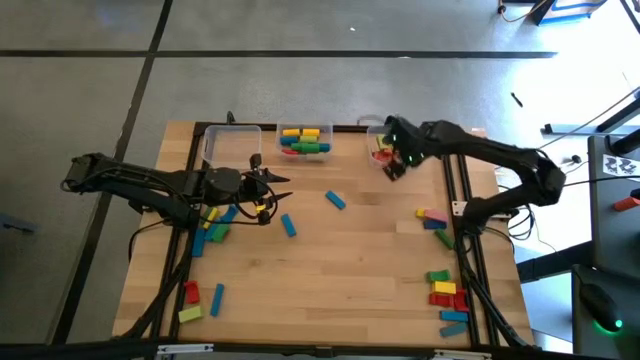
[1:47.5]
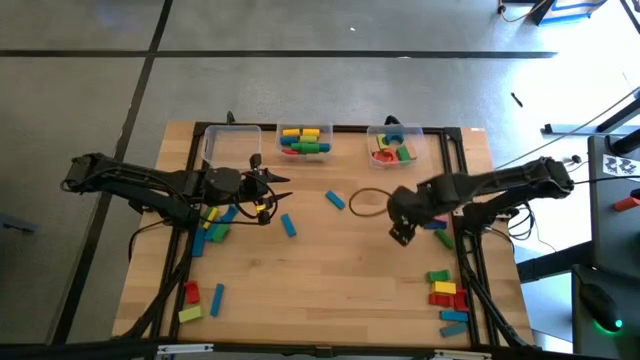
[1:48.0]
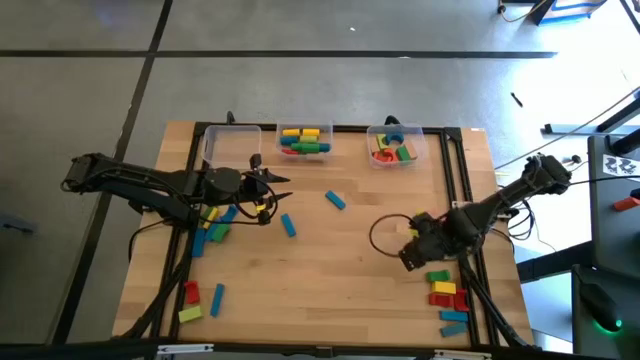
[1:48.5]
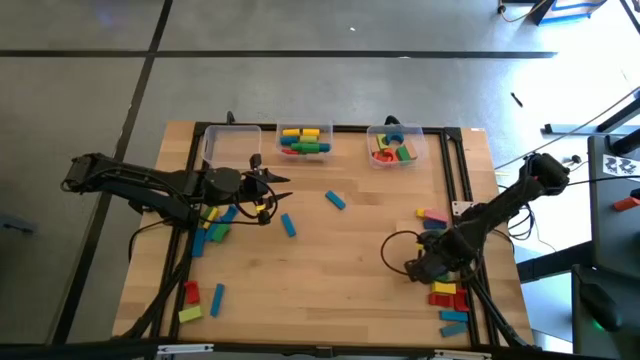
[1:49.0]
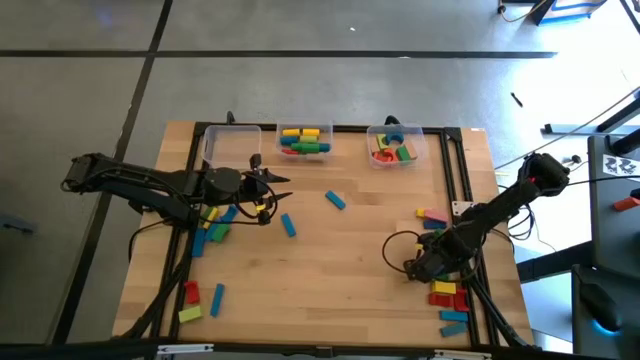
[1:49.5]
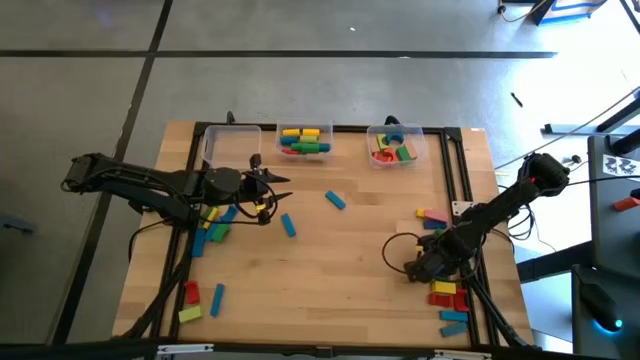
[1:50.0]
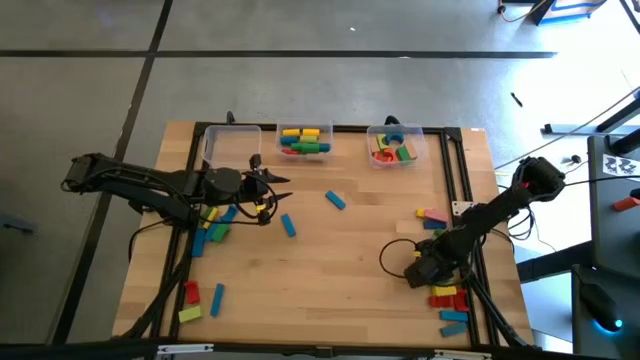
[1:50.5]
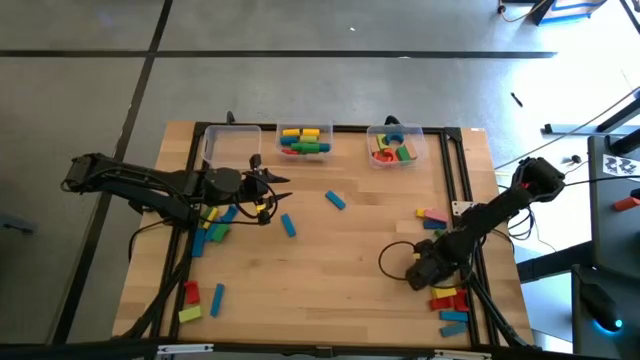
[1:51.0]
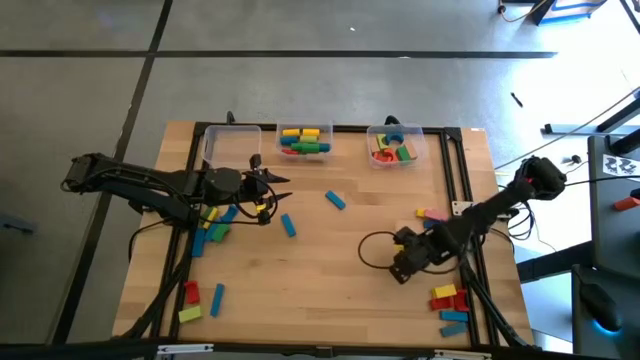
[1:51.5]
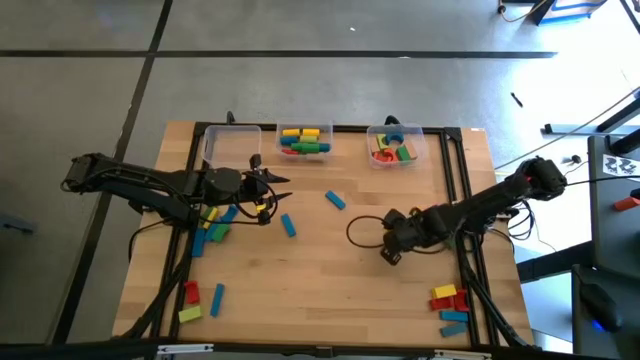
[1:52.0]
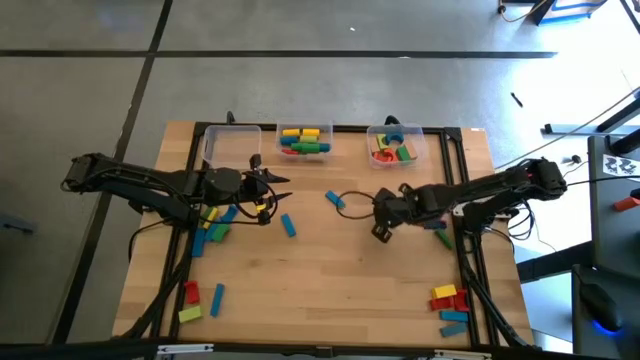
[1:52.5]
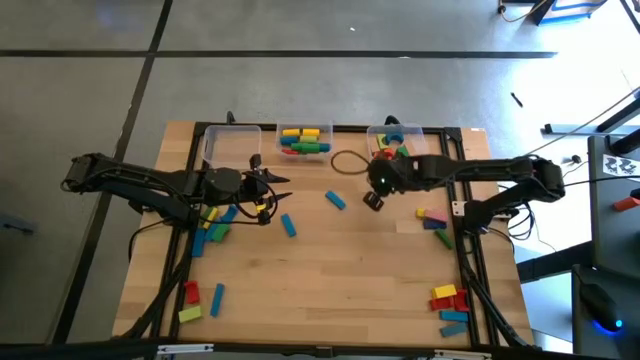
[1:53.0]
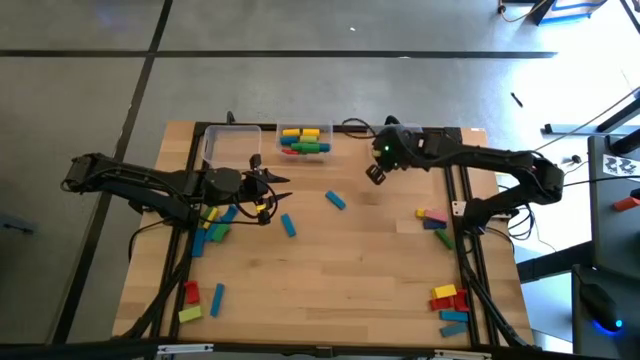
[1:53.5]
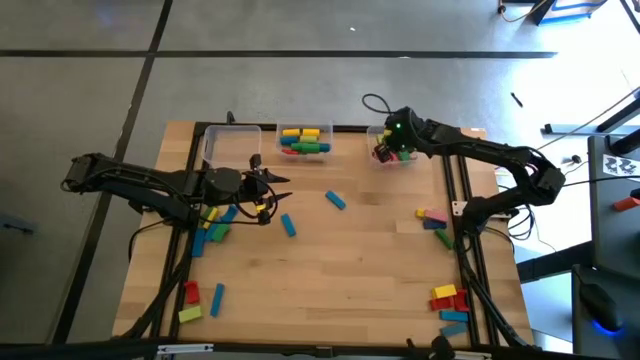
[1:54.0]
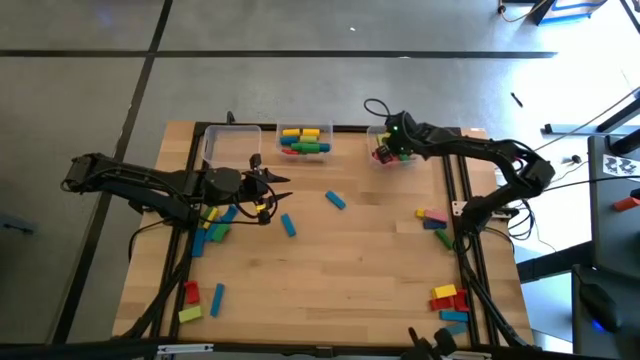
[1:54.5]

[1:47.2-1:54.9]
Task: Sort blocks by size
Put the green arch block into the right transparent bin

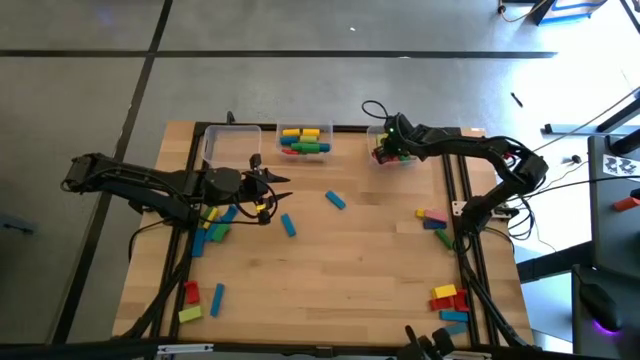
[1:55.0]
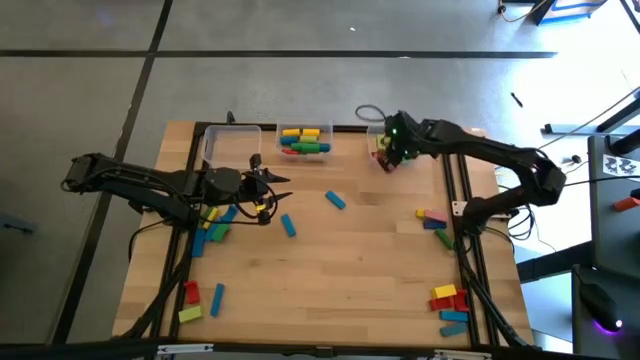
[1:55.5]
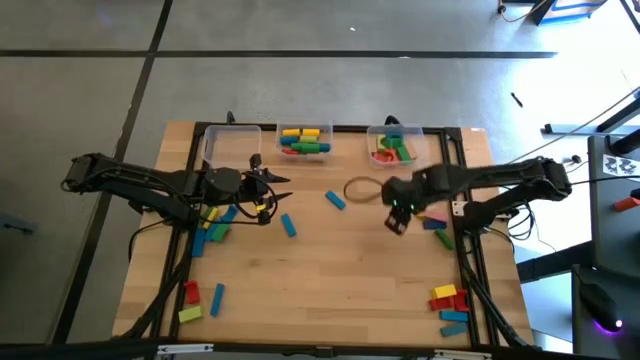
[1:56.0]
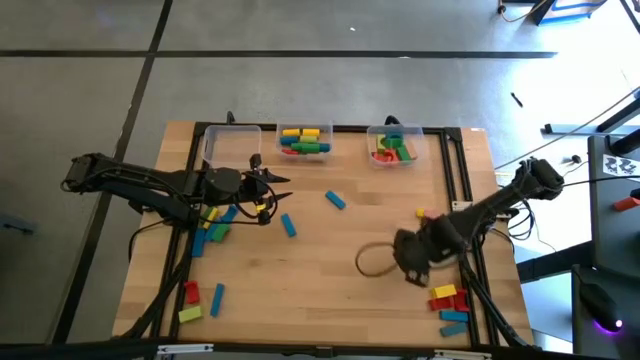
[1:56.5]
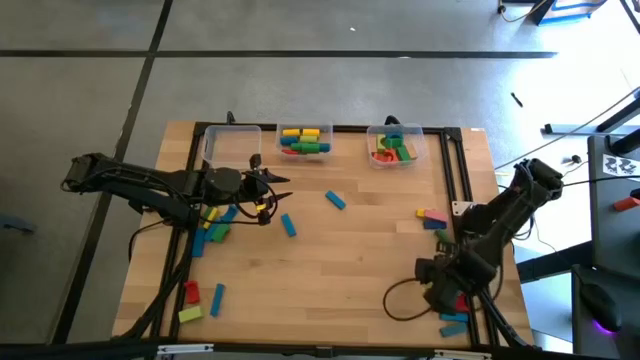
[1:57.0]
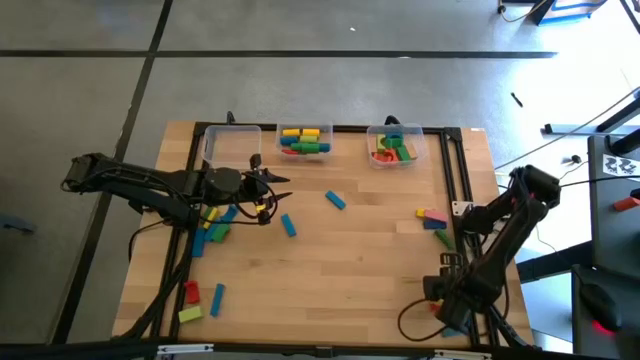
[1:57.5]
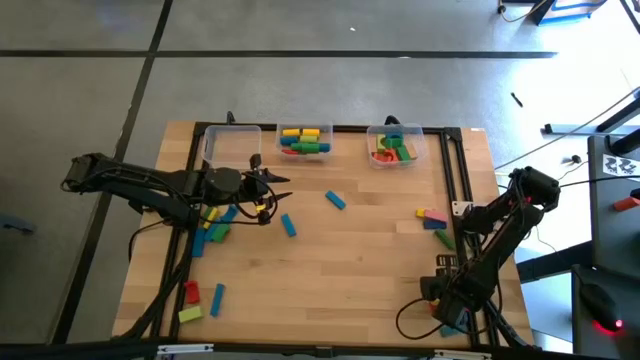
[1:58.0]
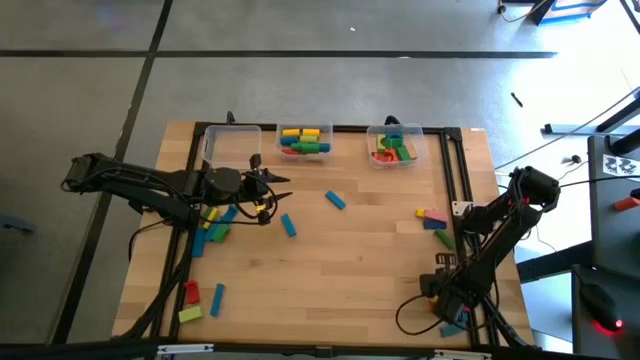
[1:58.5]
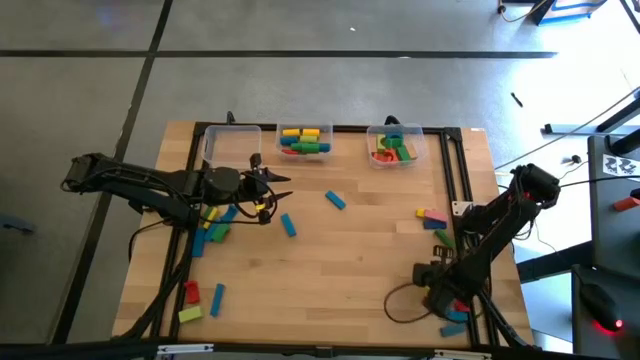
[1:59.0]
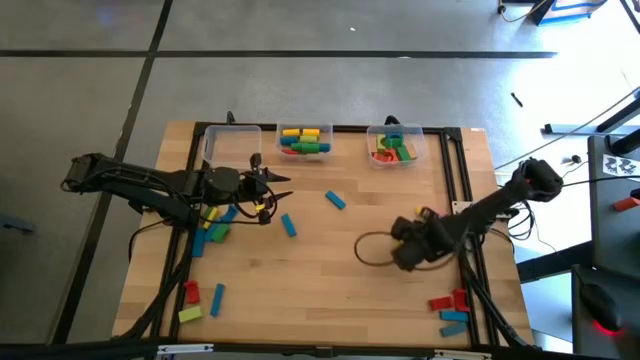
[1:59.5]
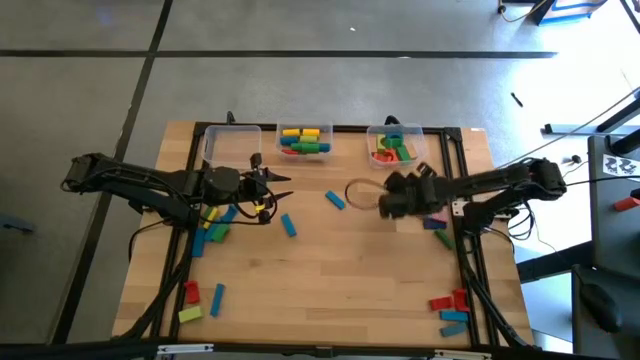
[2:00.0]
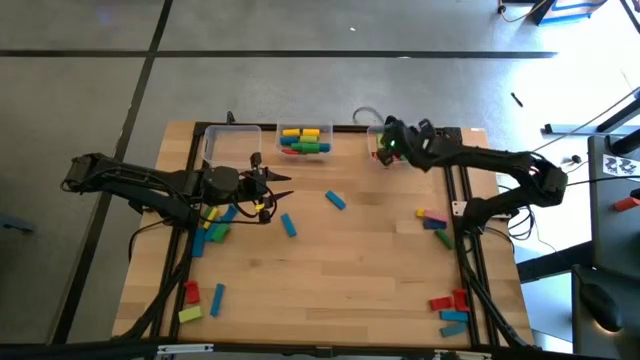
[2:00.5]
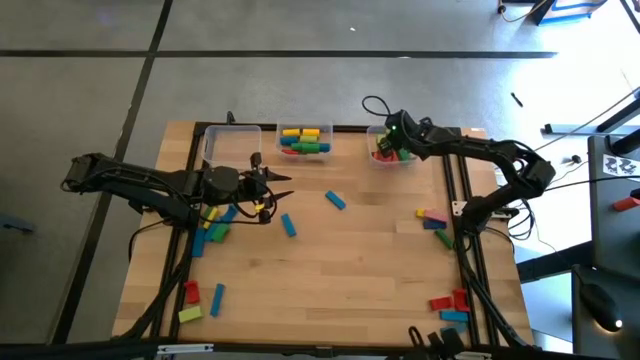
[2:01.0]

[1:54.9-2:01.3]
Put the yellow arch block into the right transparent bin

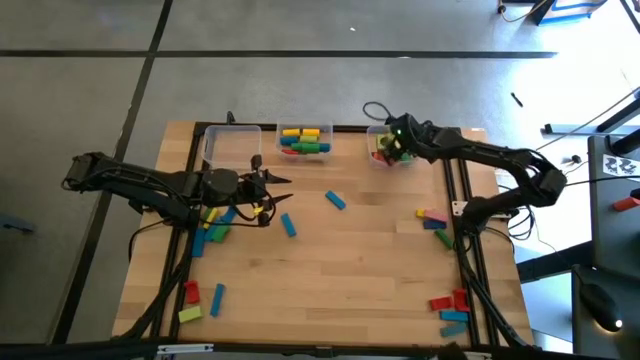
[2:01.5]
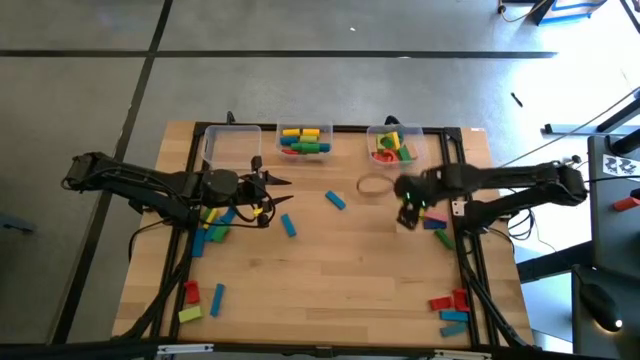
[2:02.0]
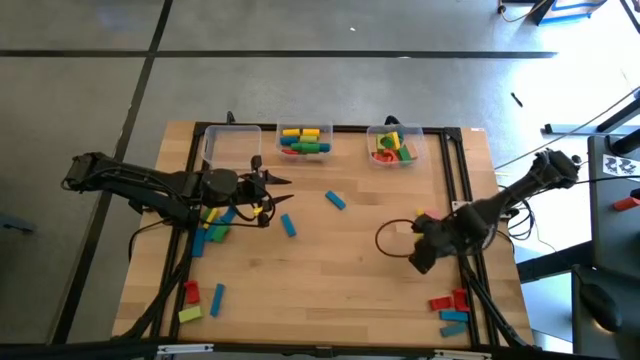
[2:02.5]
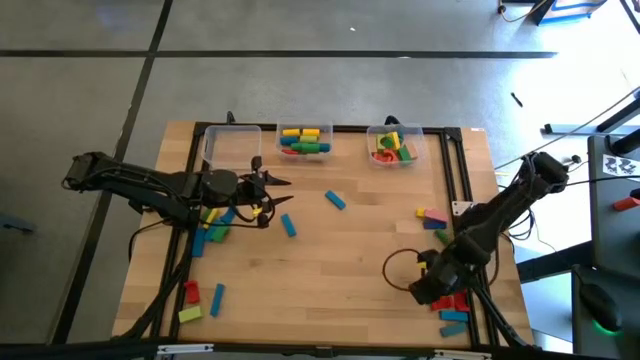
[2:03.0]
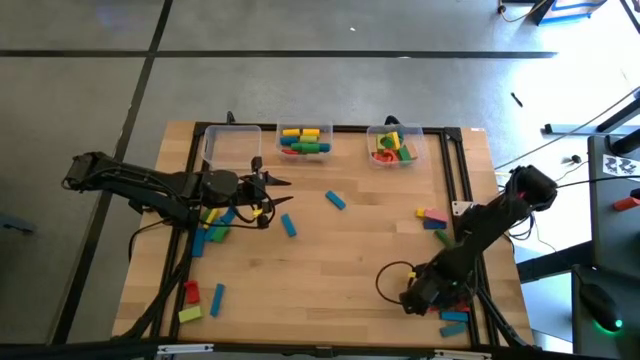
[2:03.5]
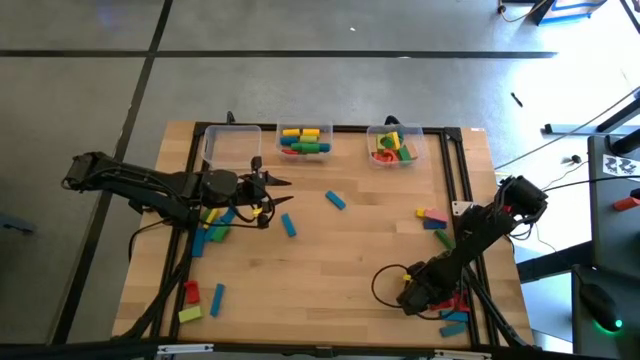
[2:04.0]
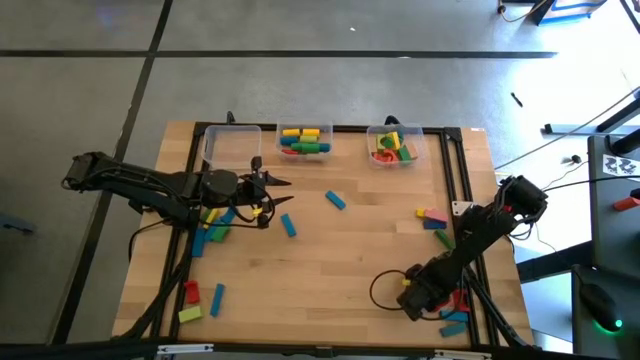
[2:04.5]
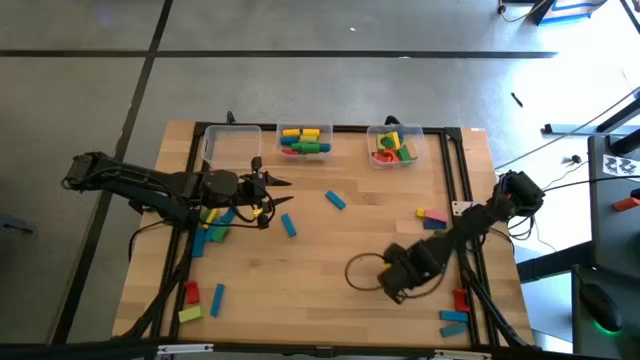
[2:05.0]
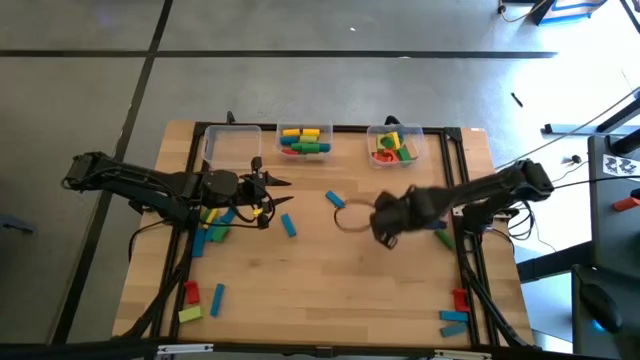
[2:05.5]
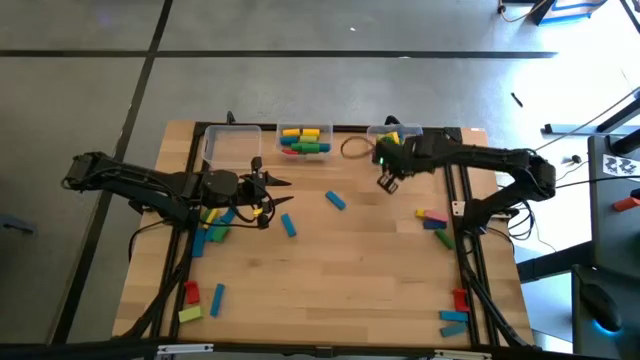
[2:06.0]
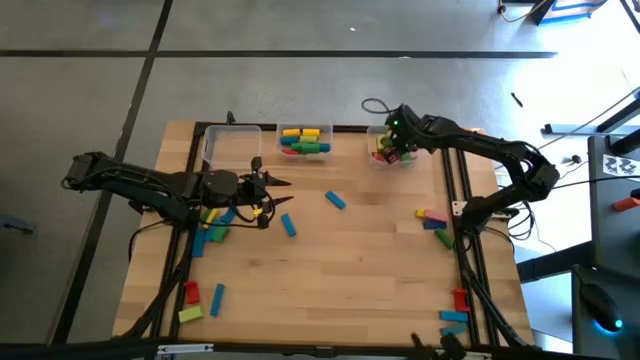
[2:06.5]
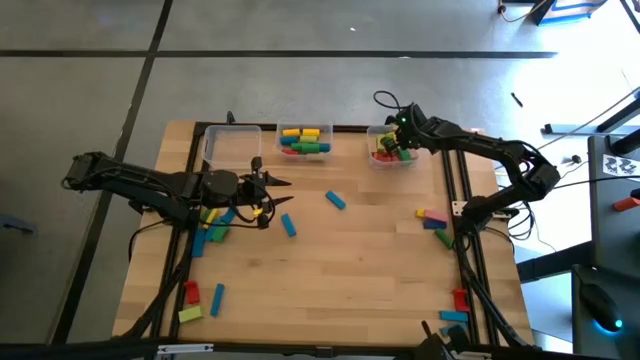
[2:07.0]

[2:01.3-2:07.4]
Put the red arch block into the right transparent bin
